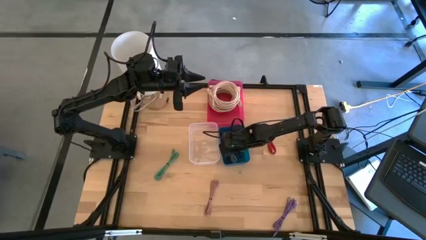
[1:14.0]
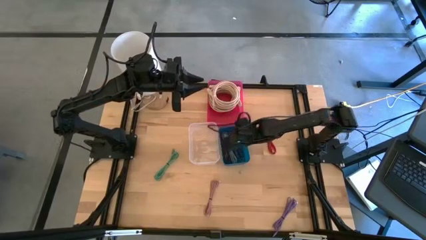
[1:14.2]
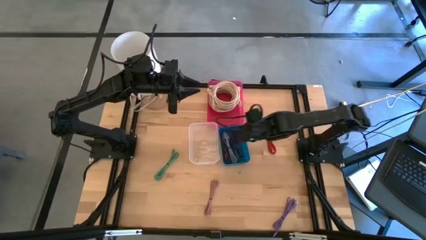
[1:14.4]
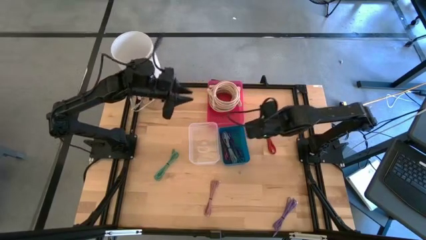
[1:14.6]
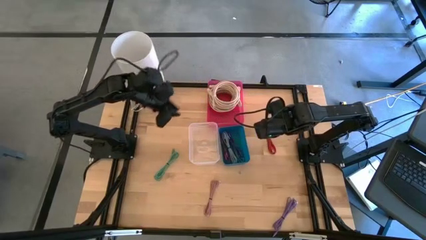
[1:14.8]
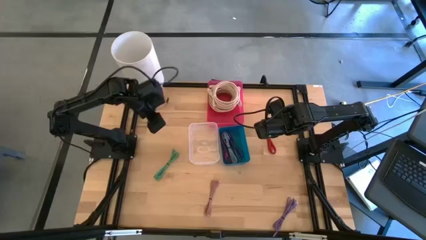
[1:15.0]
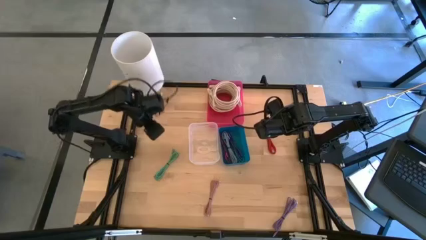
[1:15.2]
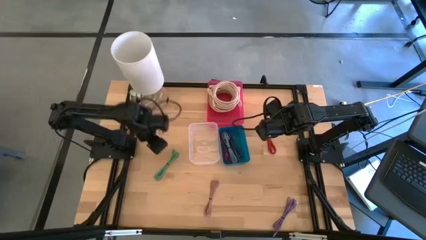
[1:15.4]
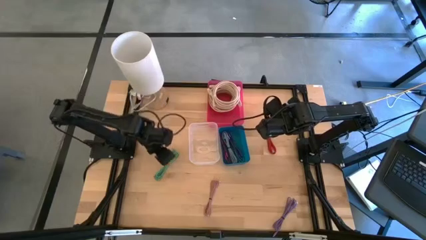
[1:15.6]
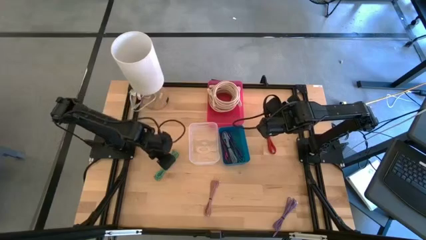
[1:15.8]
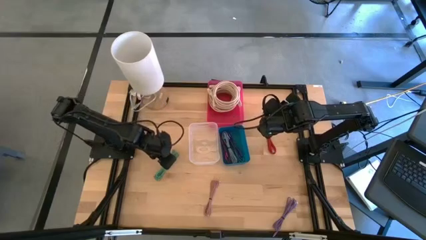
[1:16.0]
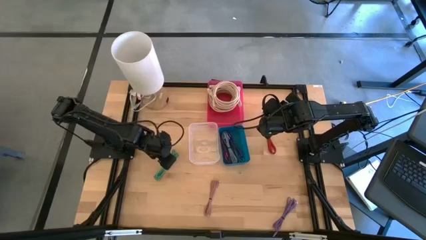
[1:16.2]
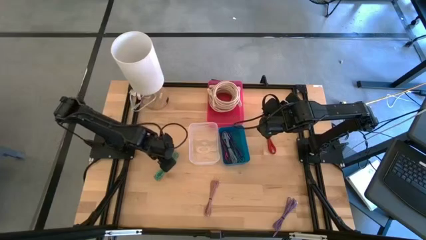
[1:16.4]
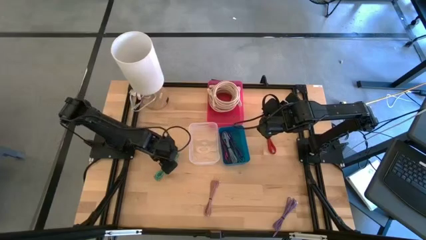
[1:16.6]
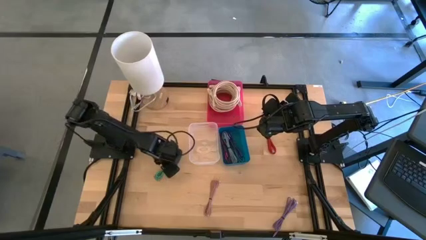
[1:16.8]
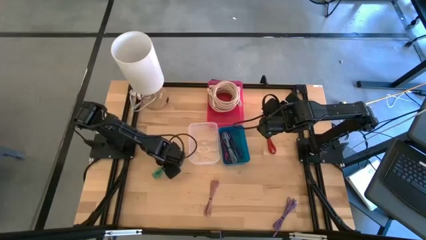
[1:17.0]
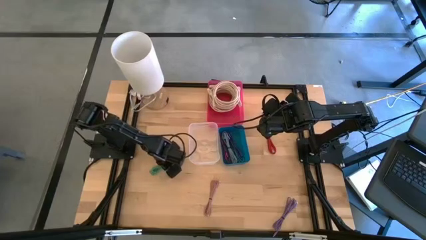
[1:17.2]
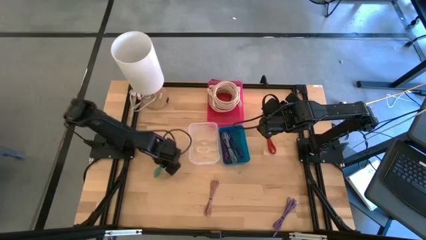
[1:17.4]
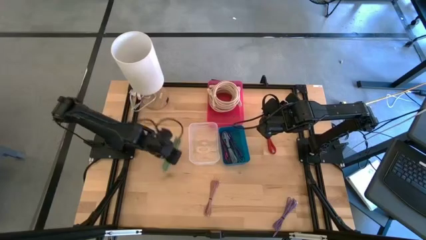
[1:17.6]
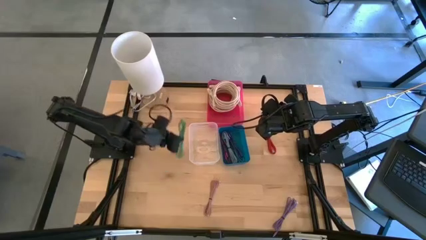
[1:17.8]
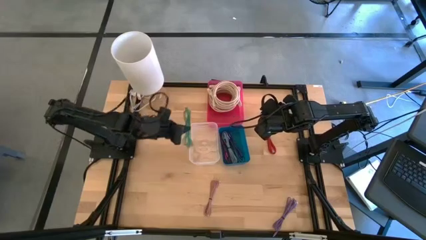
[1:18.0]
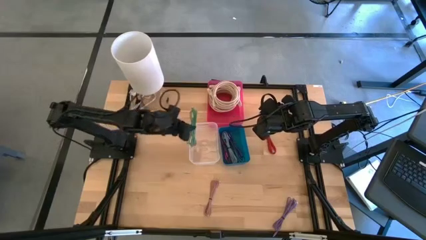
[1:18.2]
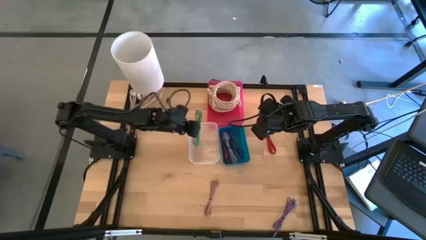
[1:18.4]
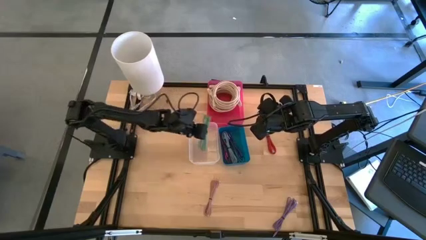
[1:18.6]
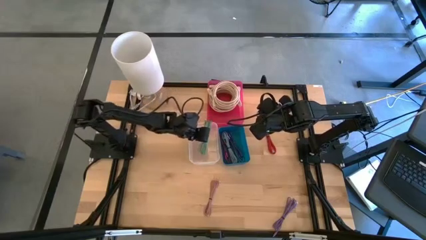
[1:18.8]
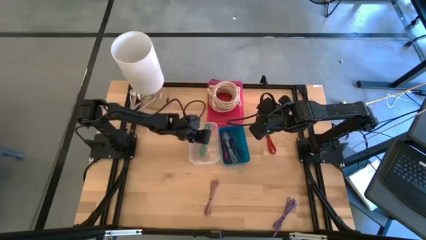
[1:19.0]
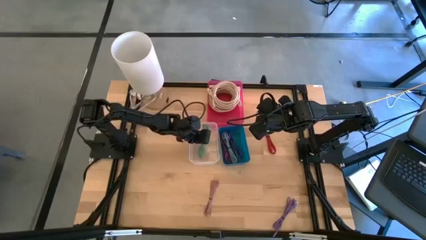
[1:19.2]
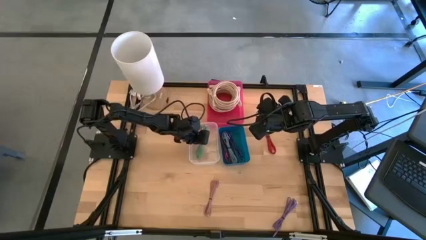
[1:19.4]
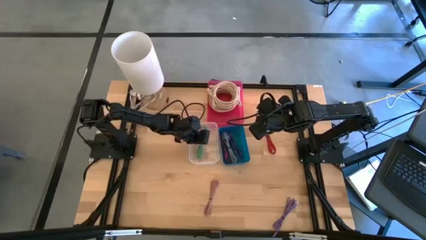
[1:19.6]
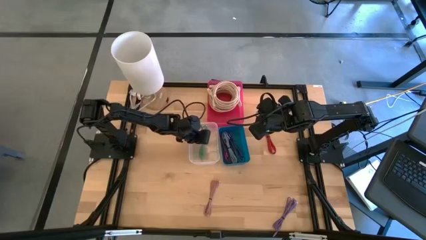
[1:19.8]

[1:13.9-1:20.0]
Task: Pick & Place USB Port
Put the green charger cable into the transparent bin

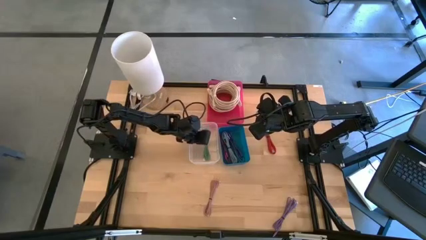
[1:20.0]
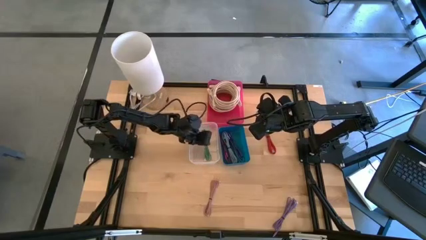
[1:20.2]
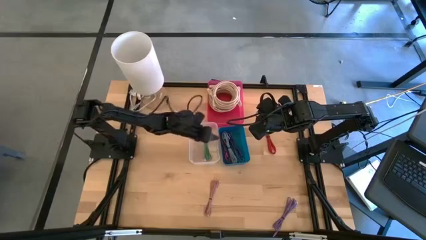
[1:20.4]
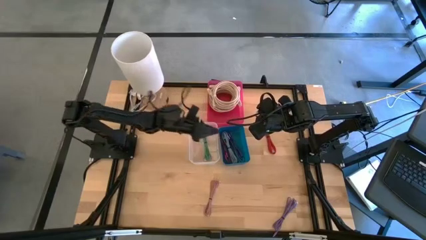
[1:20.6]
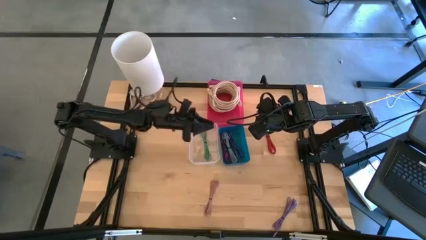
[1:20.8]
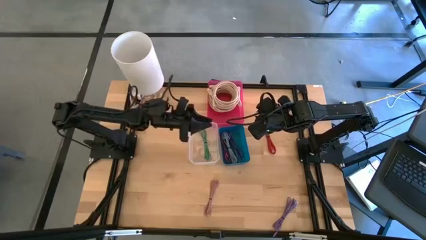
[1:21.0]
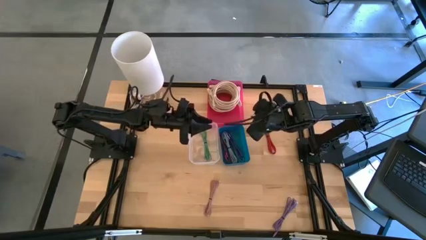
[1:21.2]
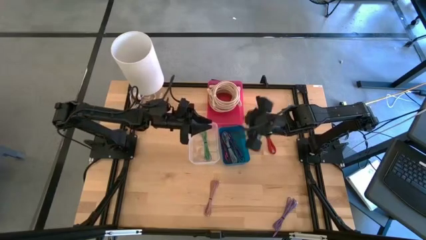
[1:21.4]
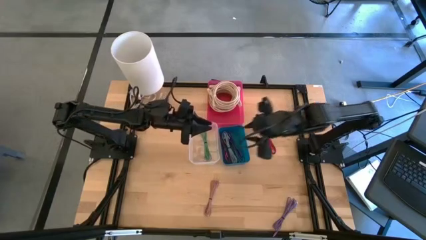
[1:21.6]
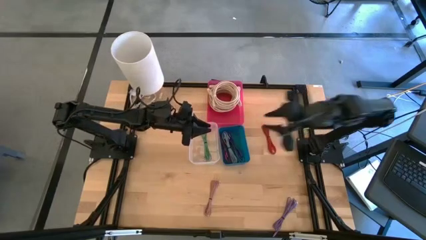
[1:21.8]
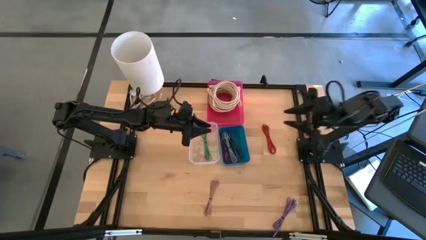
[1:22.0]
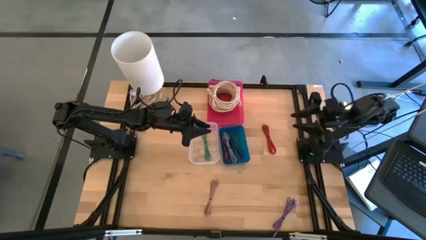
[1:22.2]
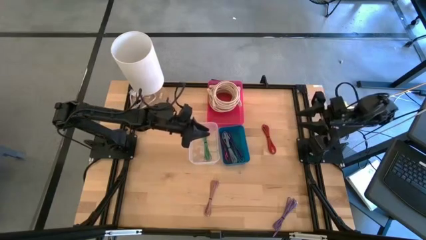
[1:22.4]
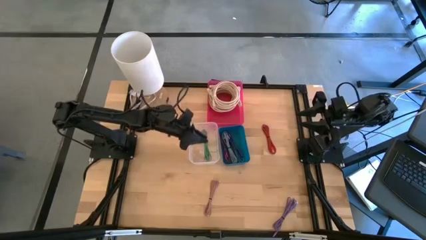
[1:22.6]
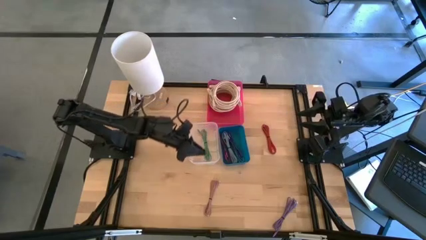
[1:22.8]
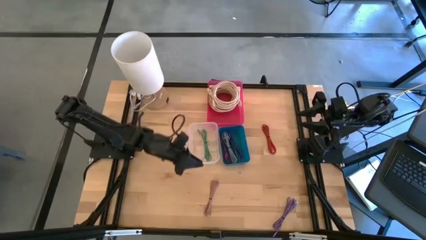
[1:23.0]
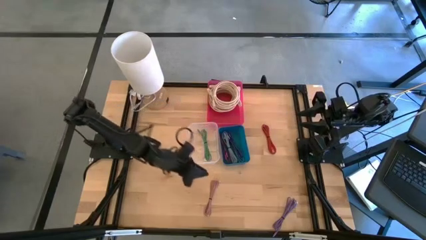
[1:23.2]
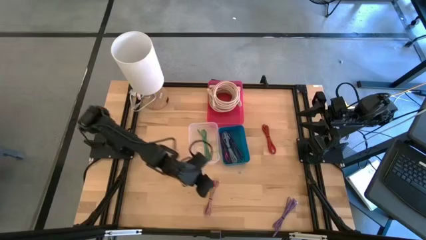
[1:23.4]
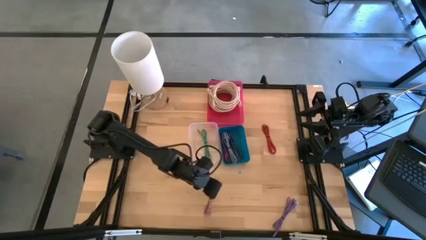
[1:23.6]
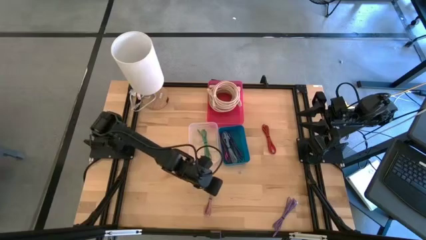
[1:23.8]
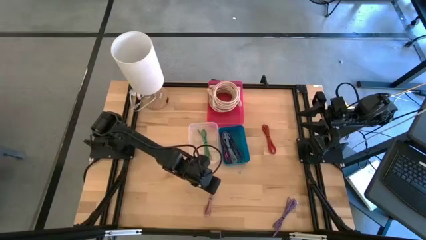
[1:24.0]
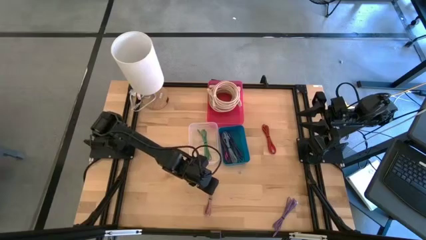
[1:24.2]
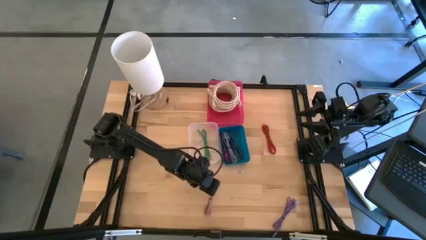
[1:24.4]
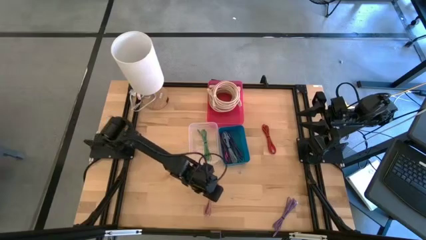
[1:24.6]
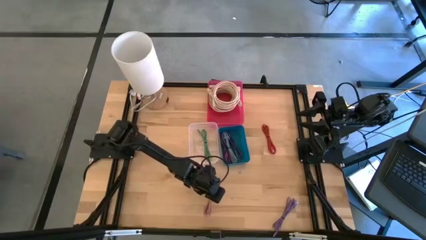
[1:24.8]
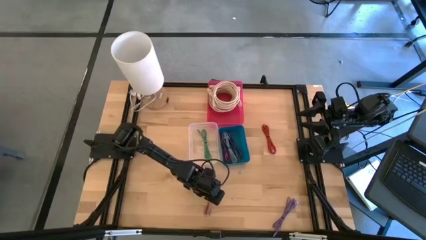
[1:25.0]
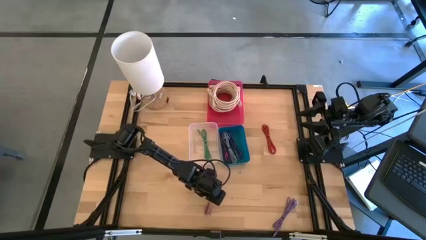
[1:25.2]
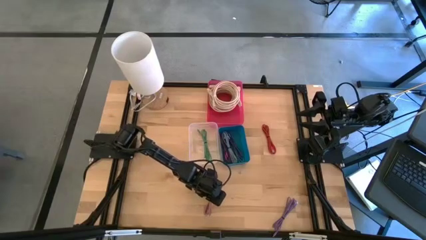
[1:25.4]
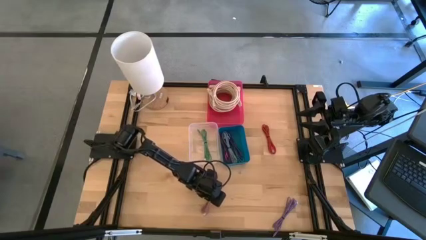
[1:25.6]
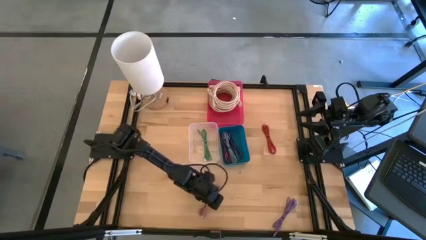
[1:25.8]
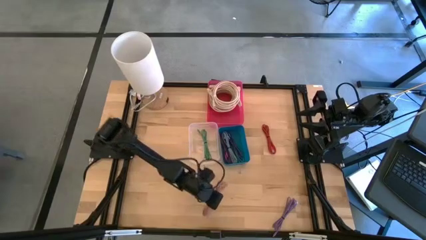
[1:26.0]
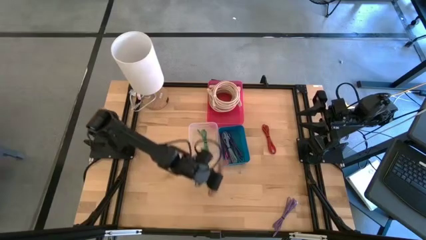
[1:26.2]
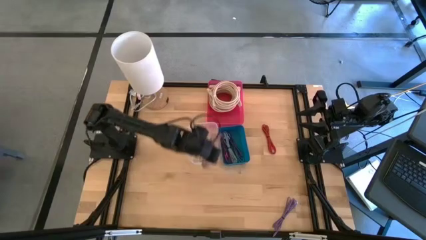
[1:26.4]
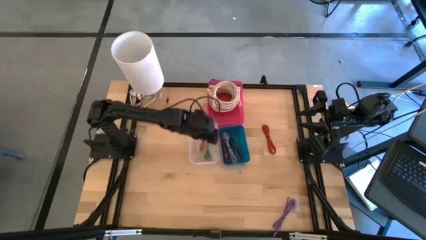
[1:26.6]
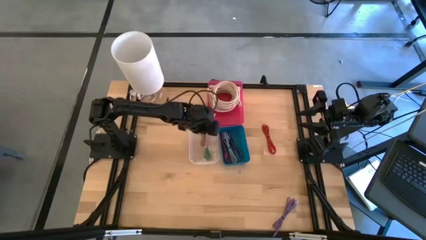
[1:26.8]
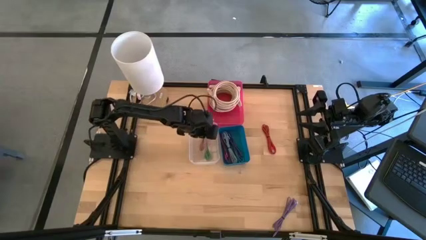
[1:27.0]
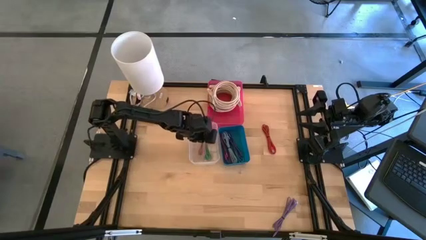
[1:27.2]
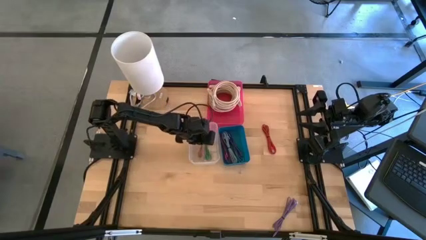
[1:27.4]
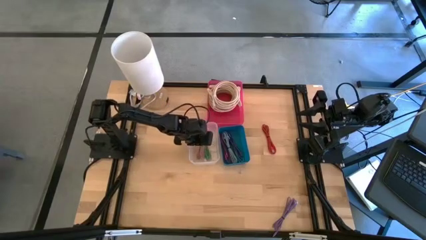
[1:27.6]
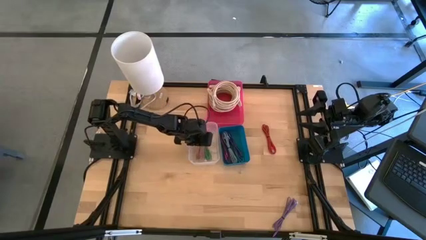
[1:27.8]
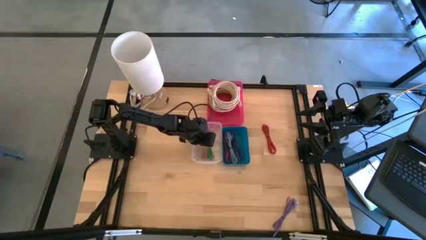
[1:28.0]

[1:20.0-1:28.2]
Put the pink charger cable into the transparent bin
